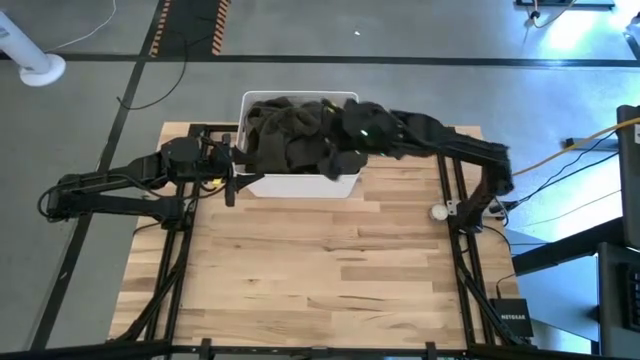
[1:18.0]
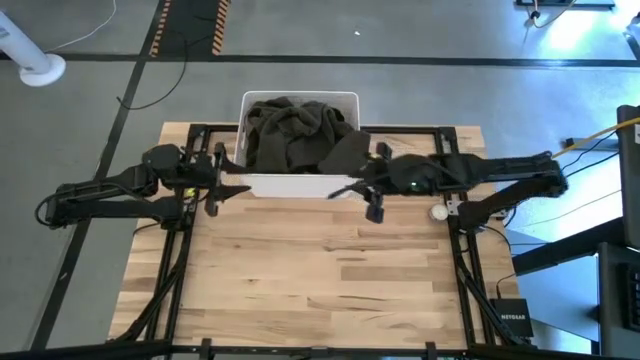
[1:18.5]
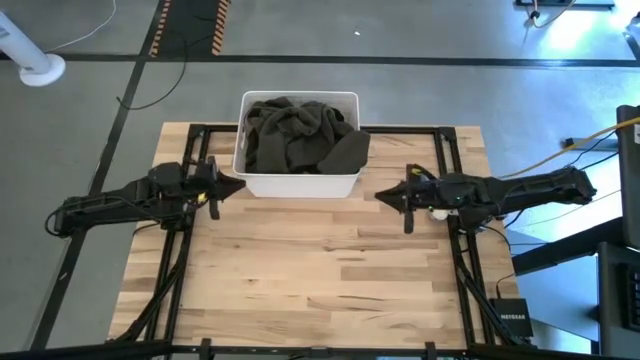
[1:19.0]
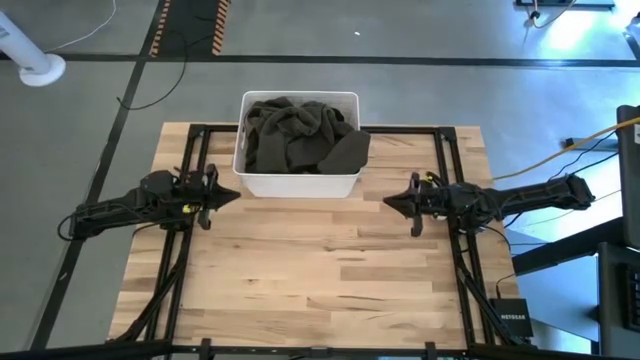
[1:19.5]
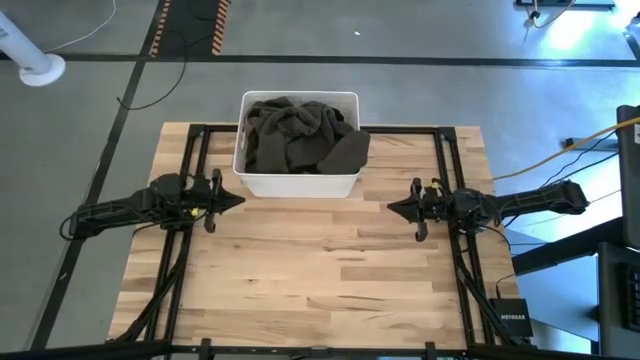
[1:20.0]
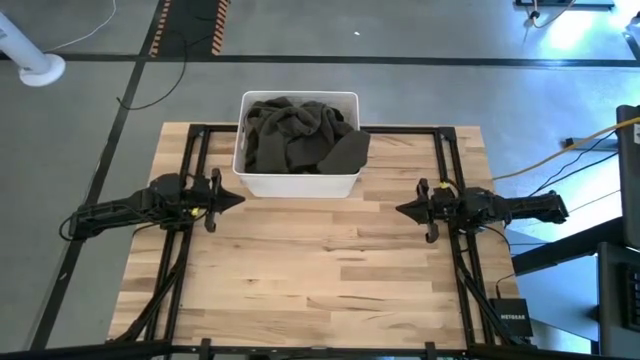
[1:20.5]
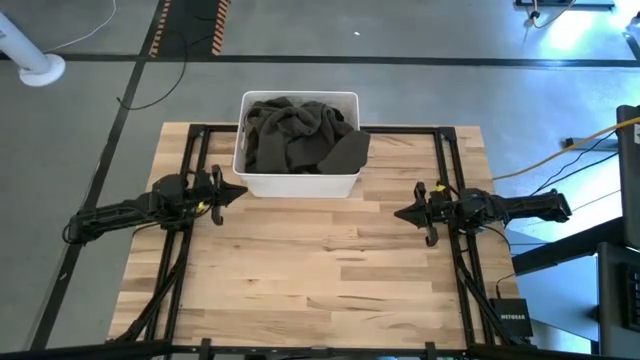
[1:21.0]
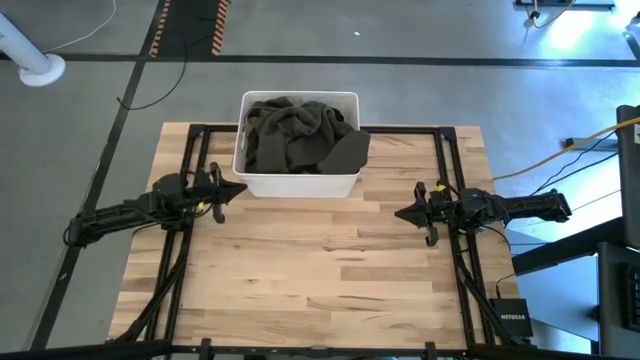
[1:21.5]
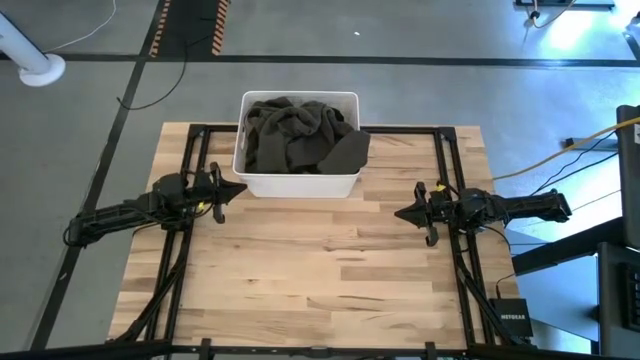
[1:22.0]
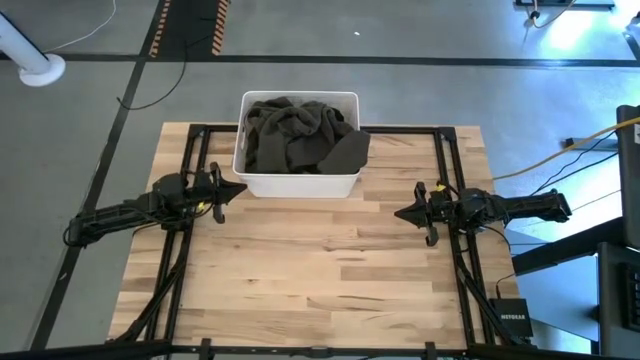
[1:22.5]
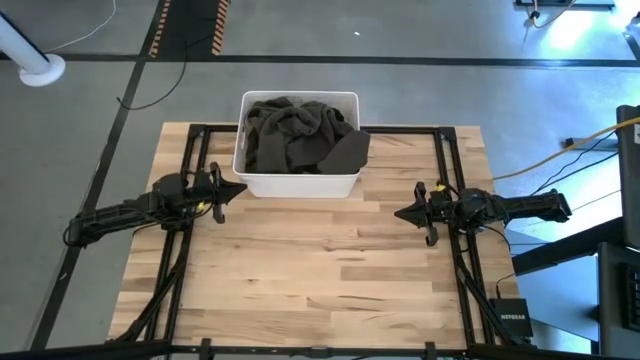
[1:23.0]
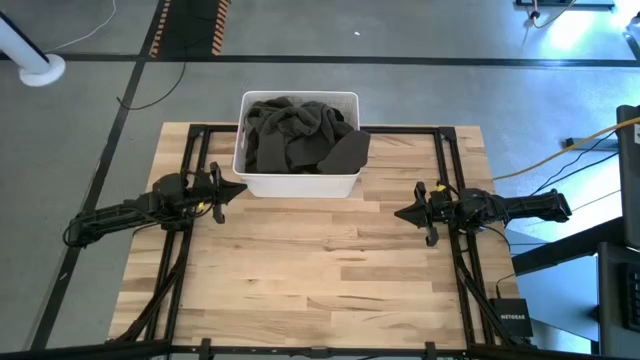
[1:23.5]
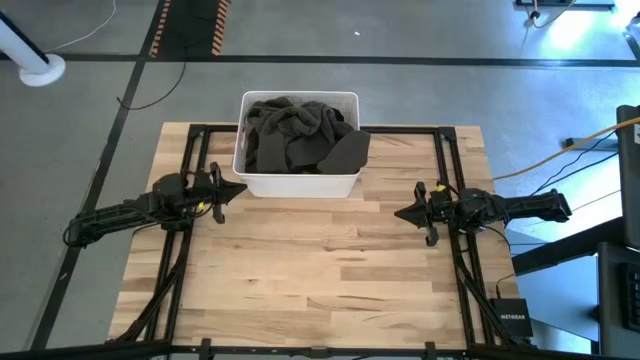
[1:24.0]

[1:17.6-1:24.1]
Task: Sort clothes
Return to Home Position

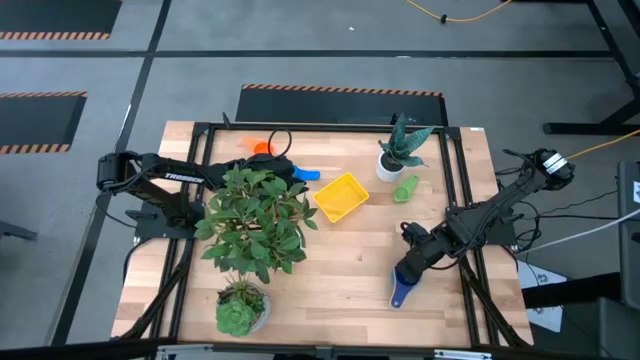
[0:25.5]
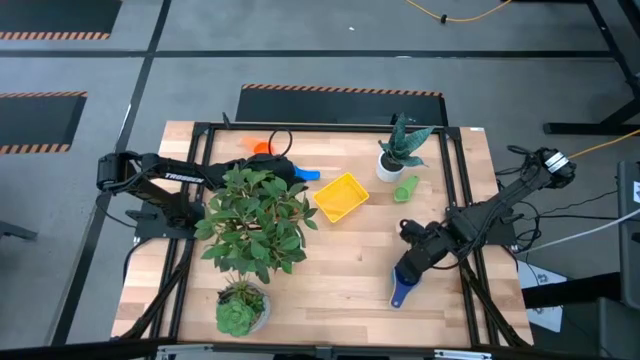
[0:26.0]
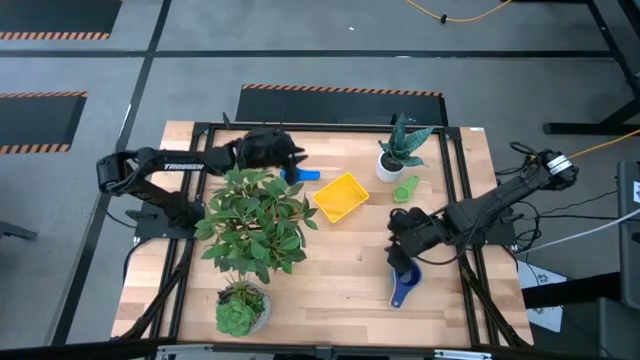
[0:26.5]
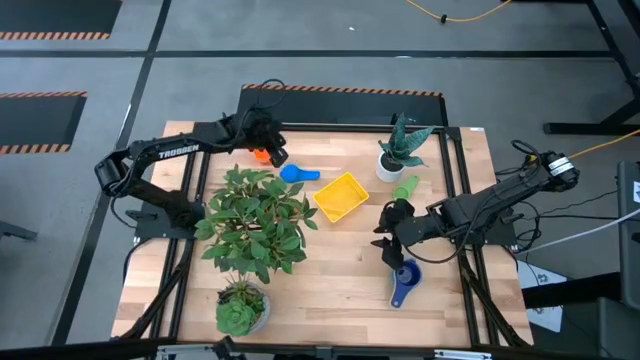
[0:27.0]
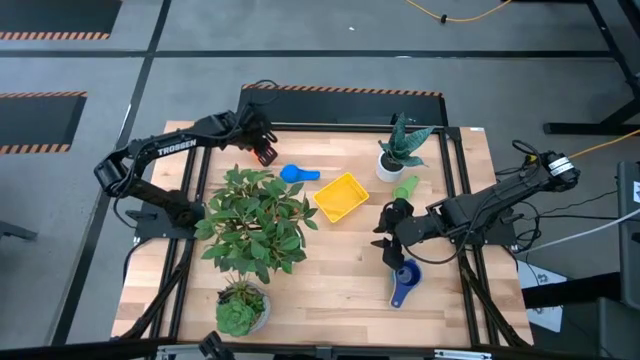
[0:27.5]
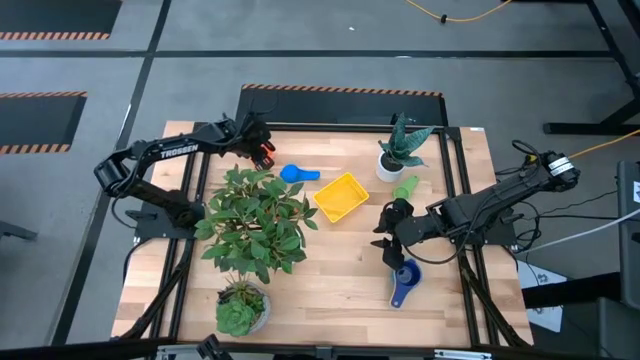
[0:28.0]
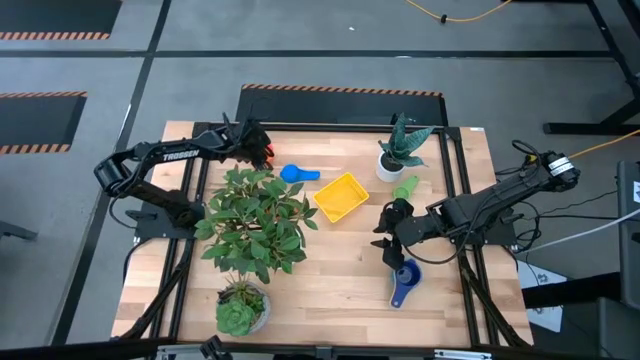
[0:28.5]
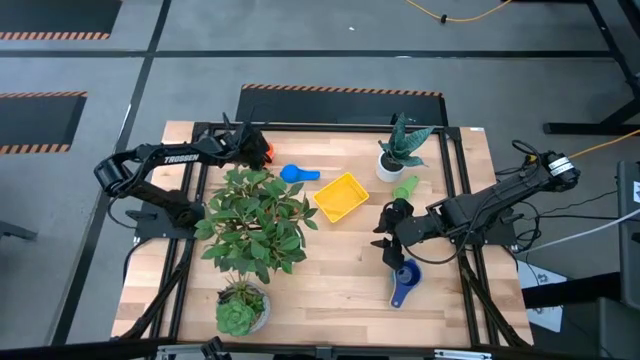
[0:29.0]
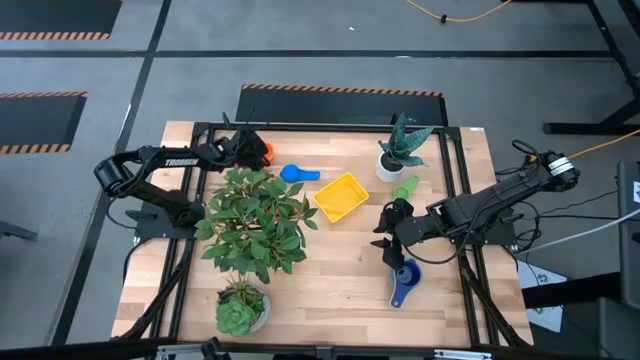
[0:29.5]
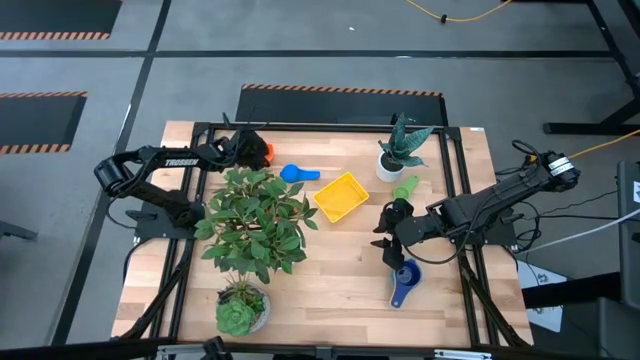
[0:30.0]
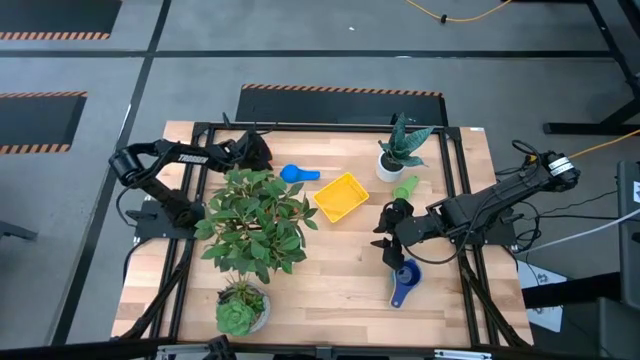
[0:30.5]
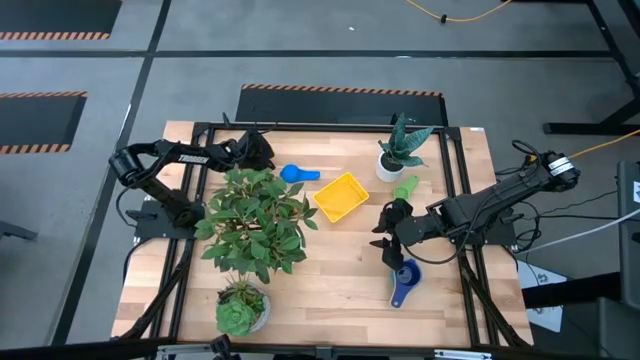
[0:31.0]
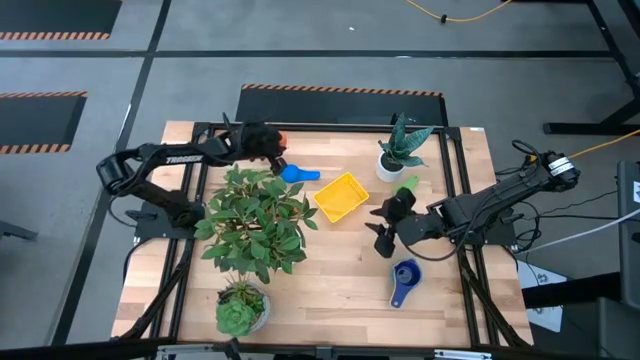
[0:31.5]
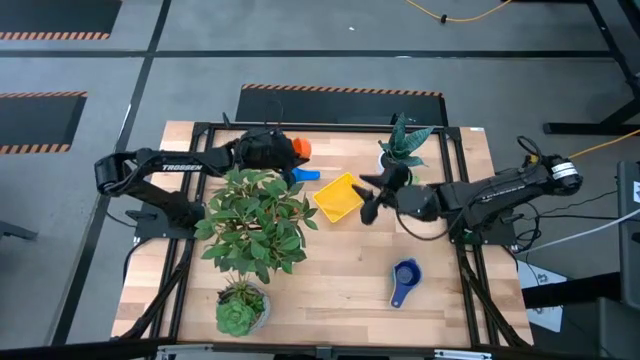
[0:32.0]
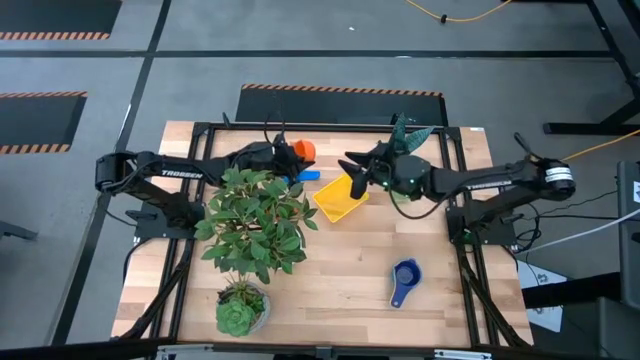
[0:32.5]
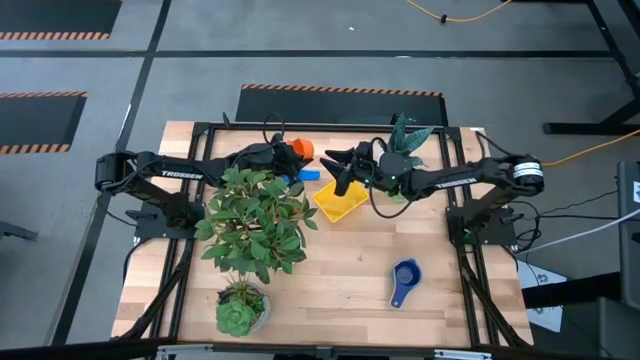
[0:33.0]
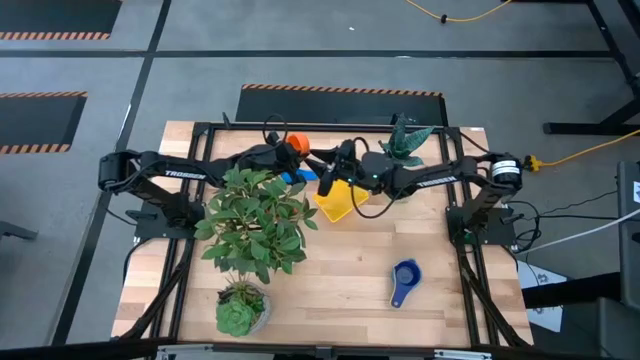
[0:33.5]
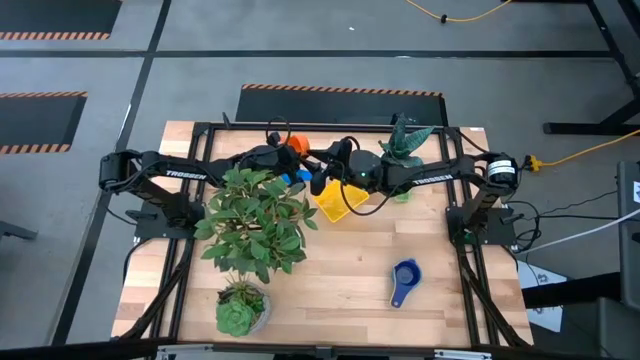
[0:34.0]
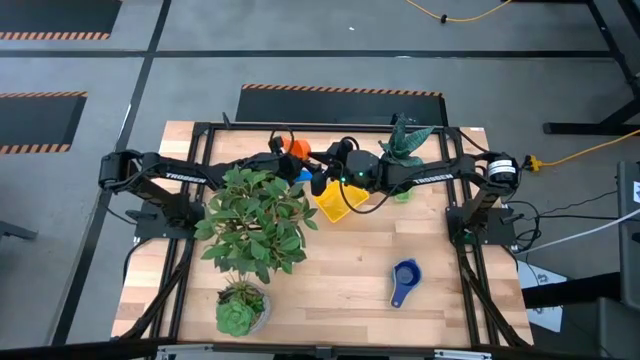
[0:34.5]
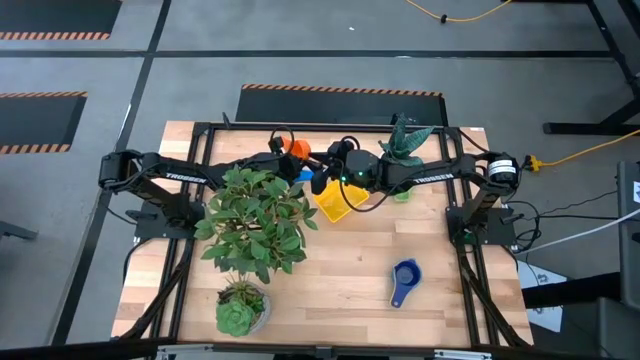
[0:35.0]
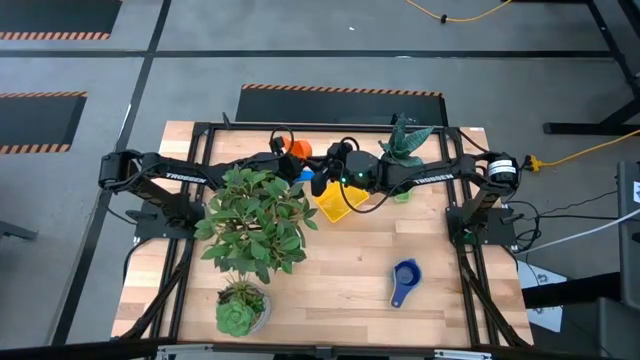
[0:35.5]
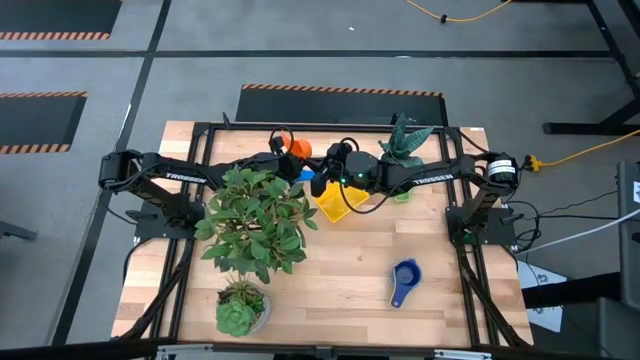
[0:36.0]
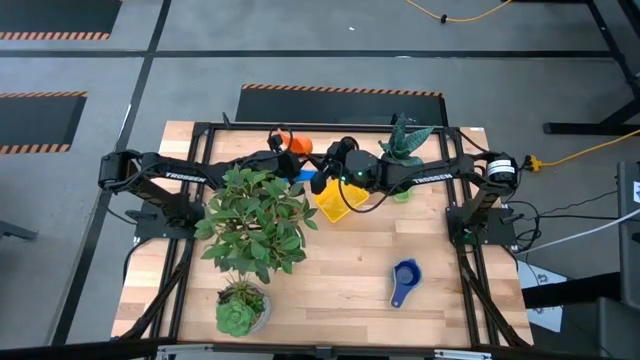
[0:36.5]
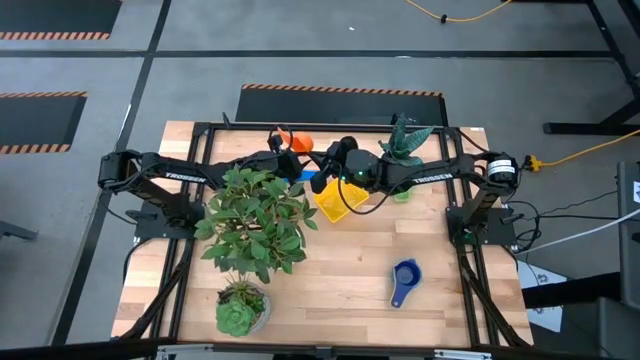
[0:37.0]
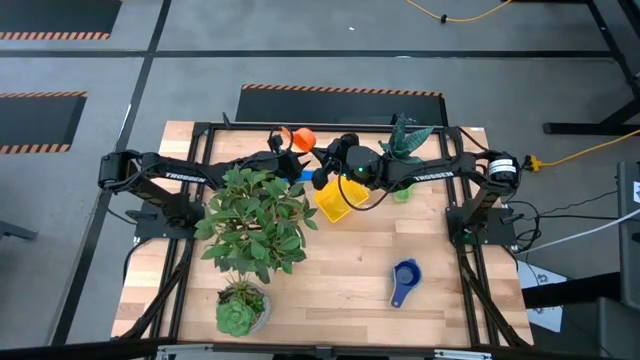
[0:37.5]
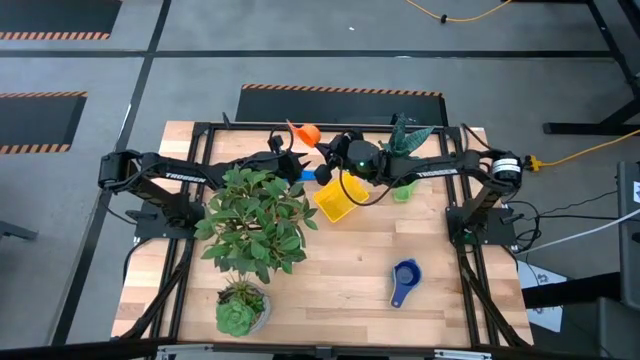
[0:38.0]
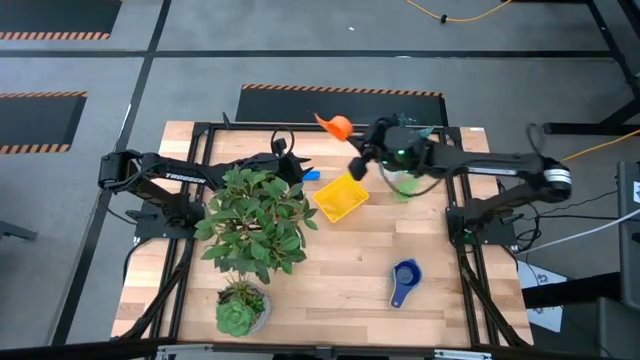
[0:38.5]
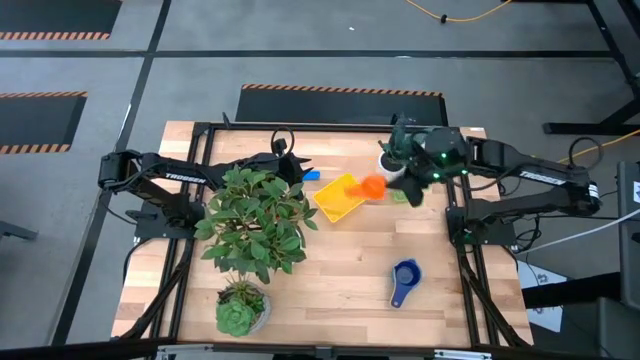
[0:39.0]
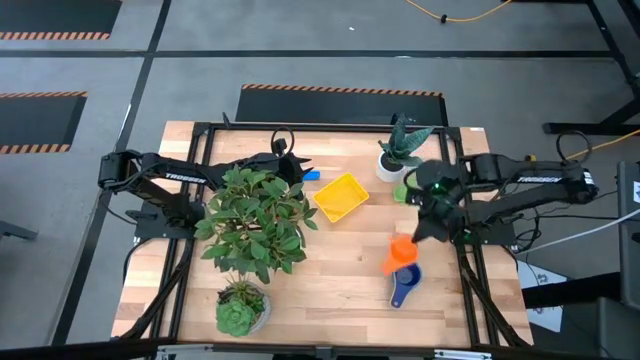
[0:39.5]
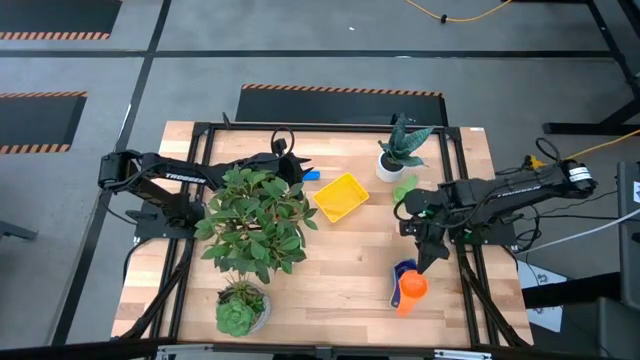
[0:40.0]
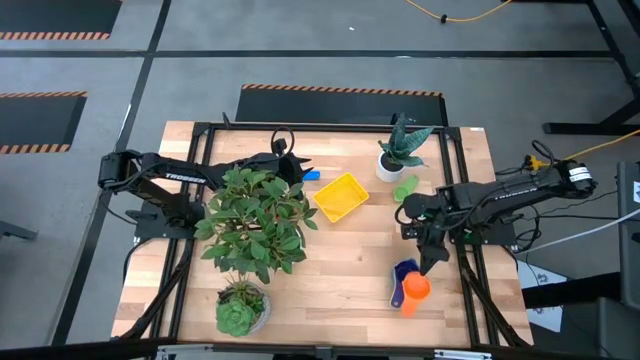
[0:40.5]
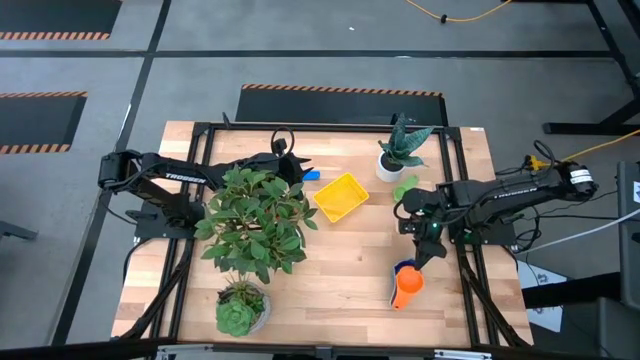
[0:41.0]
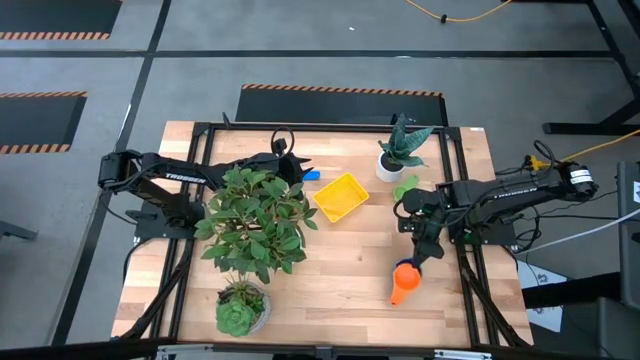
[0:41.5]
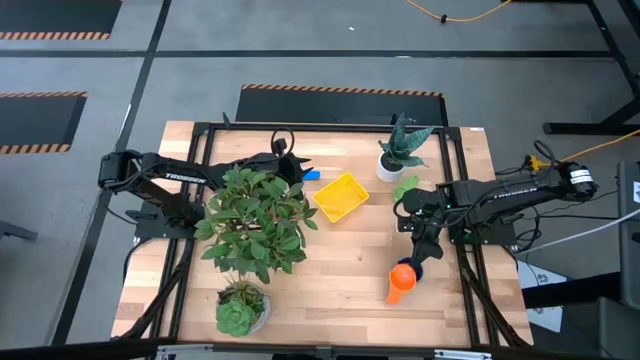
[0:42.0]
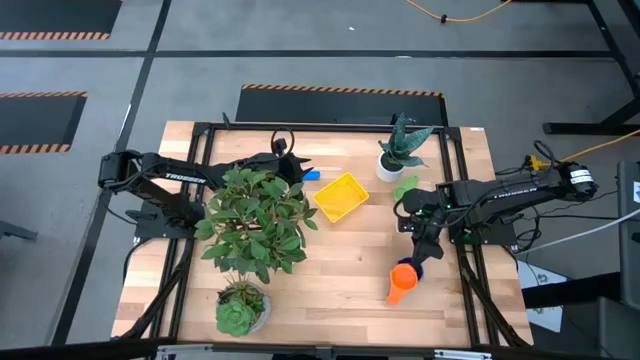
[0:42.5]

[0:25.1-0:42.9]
Task: Nest measuring cups in basket
Stack the orange measuring cup on top of the dark blue measuring cup
